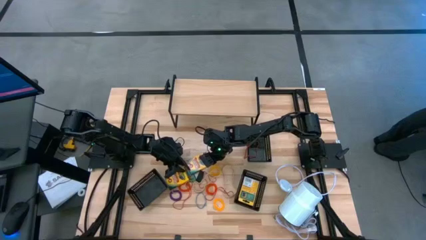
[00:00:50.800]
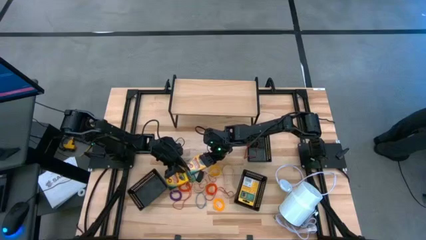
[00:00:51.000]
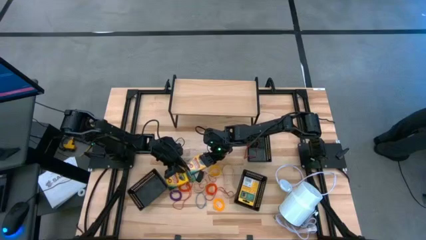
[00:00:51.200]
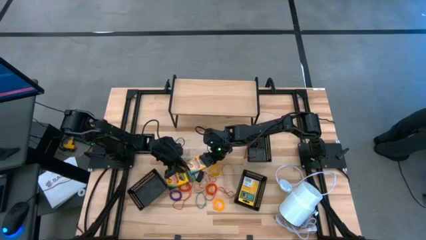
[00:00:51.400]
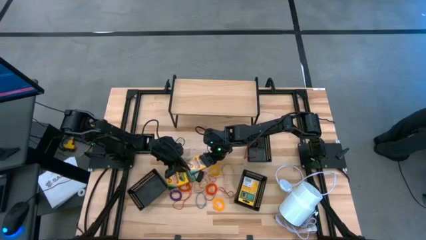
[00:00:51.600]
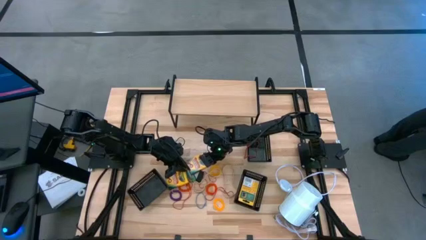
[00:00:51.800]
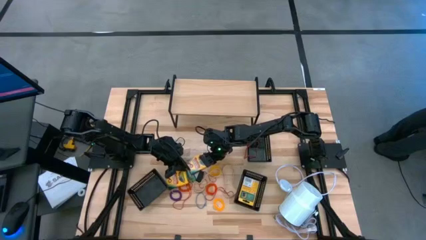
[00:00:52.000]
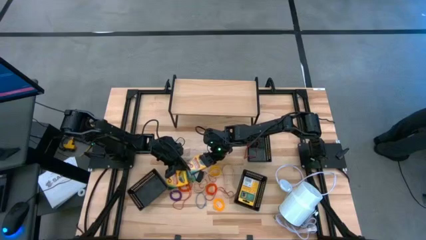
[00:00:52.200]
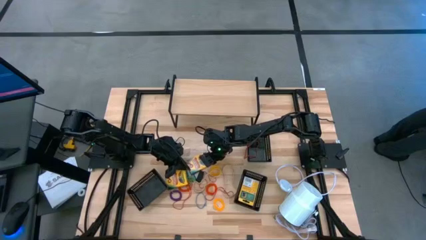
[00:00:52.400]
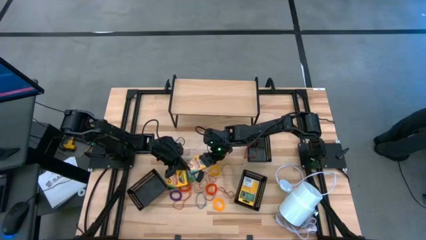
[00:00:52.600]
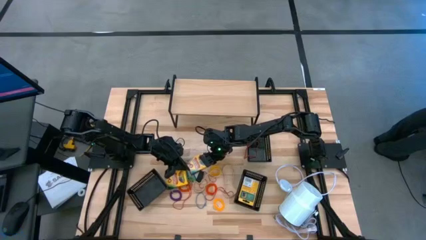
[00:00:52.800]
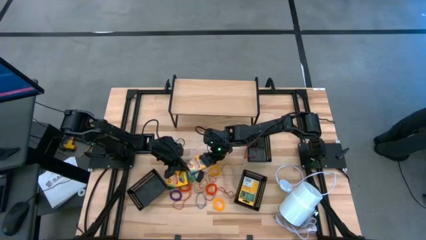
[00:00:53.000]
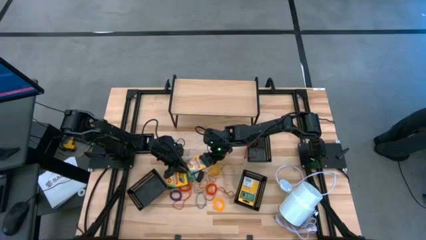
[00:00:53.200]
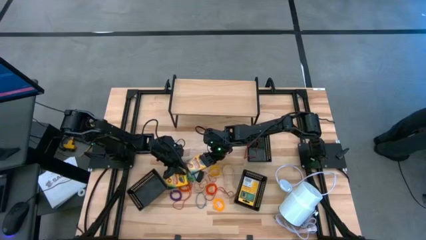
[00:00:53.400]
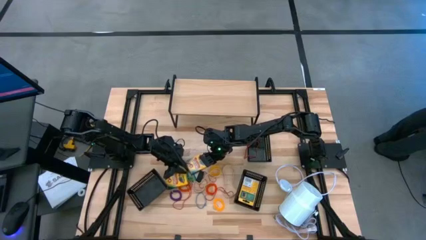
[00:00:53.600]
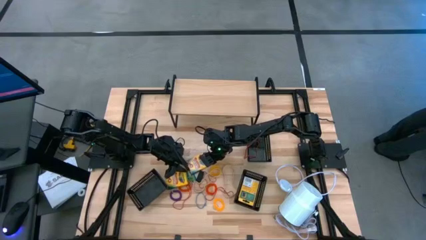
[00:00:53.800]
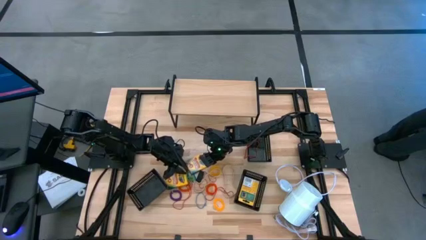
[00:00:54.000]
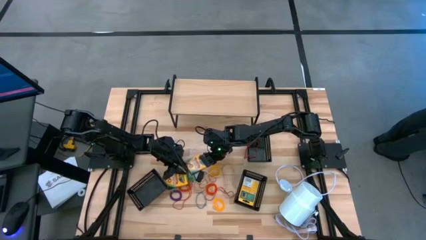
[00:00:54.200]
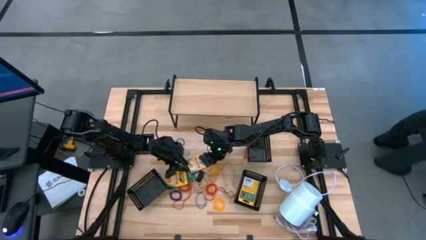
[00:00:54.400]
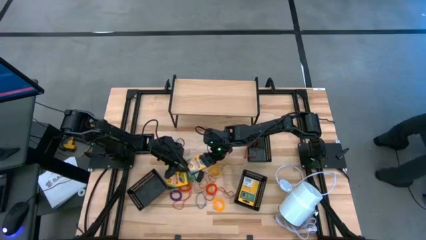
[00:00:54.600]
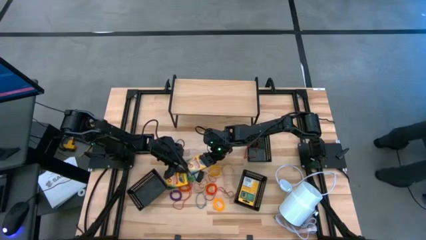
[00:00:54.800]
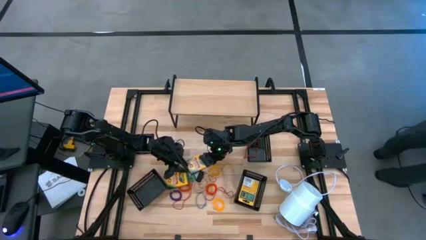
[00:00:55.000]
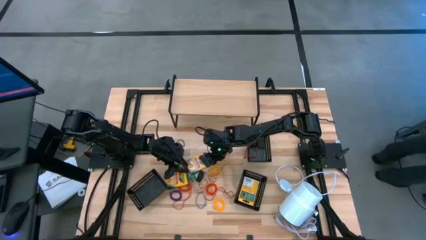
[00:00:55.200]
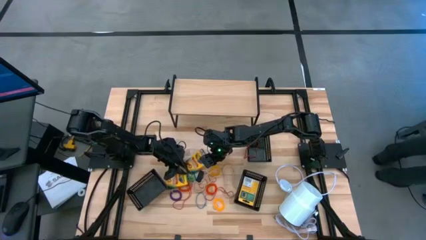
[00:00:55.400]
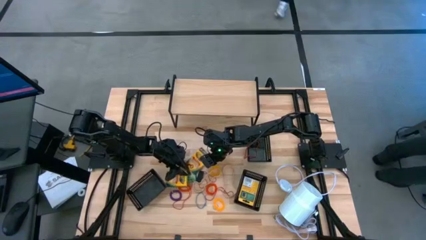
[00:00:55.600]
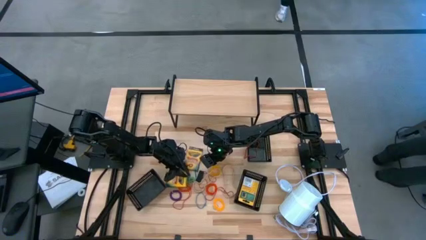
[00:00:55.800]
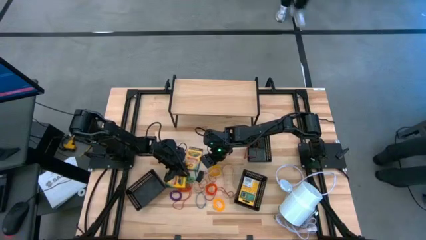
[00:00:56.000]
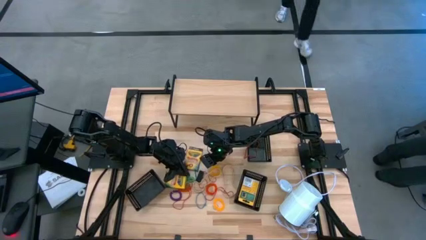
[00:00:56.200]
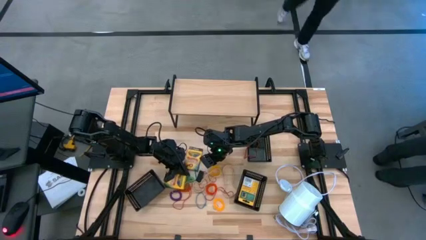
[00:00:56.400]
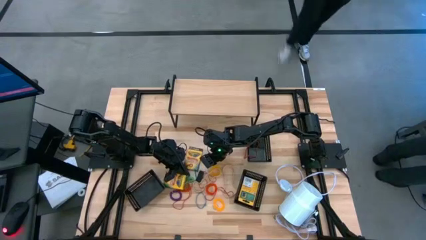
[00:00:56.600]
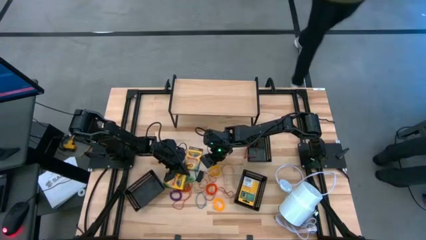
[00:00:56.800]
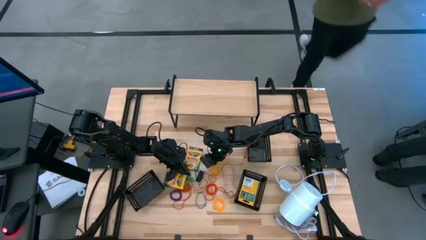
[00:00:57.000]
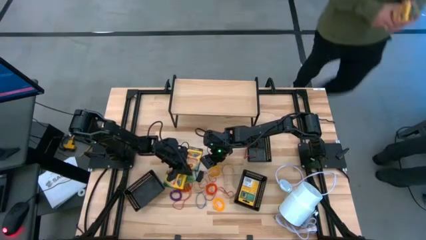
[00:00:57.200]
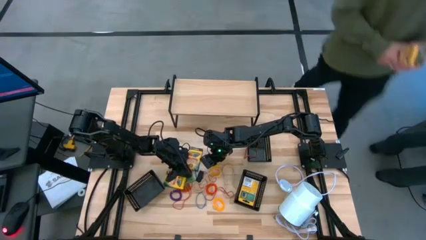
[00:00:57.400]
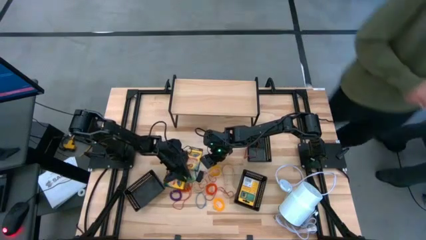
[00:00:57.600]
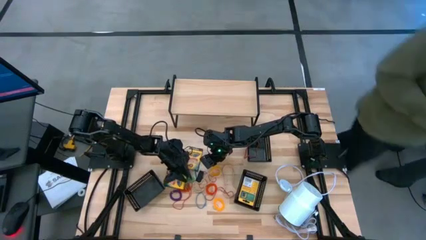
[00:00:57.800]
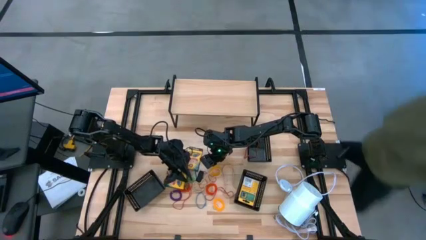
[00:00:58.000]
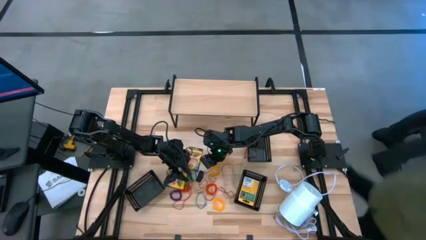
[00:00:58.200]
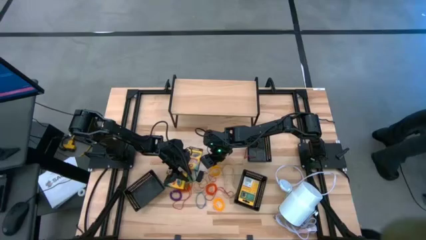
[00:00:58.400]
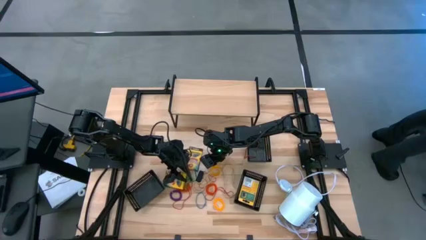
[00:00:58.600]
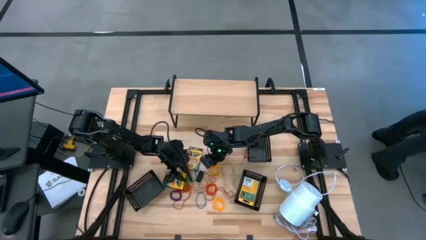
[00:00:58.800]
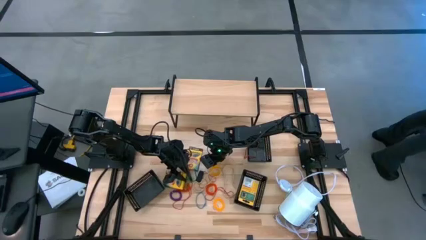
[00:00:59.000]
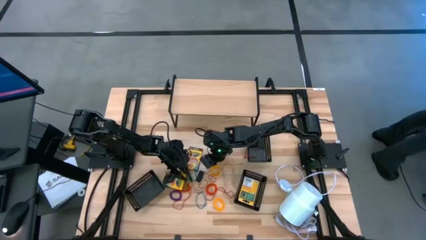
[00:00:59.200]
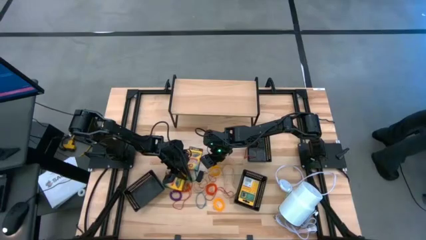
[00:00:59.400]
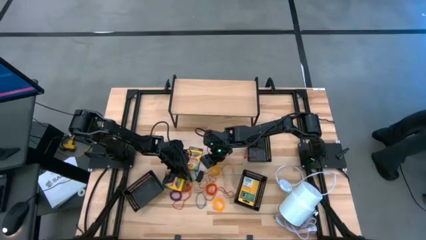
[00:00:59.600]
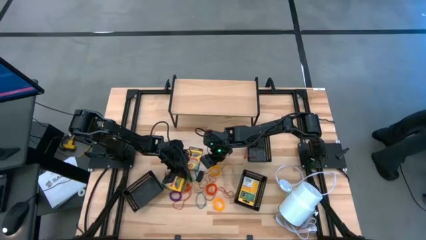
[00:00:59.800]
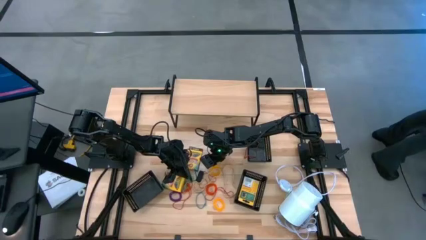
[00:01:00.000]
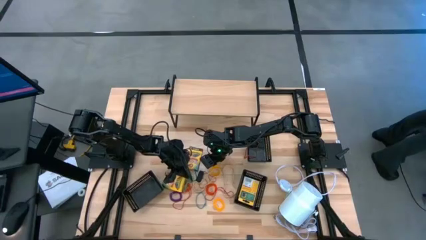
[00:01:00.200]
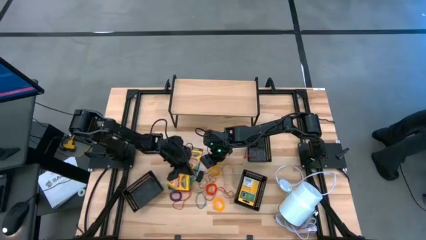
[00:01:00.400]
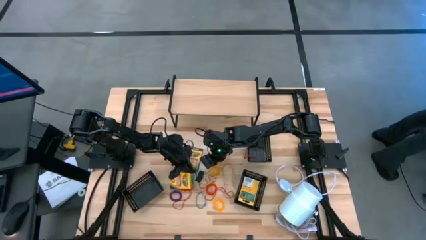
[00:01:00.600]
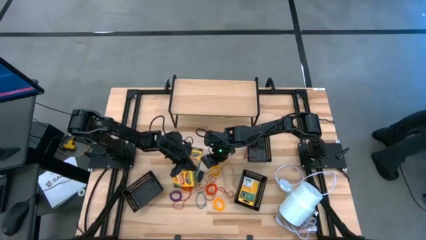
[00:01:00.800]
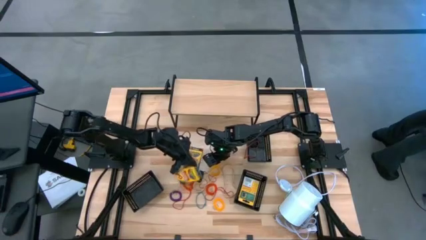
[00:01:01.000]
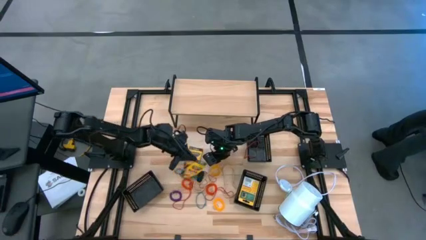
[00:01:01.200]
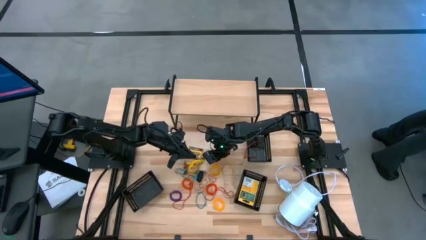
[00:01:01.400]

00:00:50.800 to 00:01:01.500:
Task: Pick & Place Office Desk Supplies
Put the left crayon box into the bottom right black bin

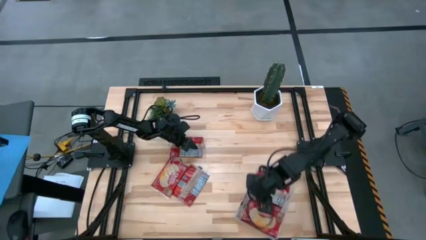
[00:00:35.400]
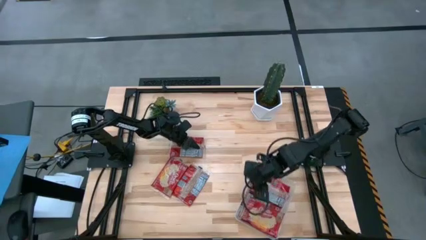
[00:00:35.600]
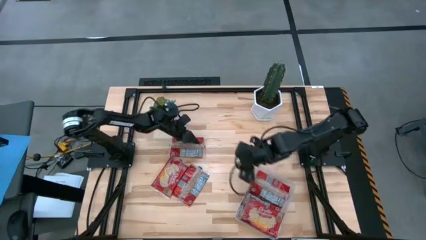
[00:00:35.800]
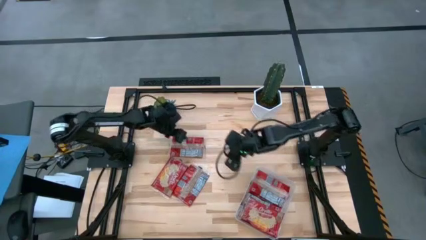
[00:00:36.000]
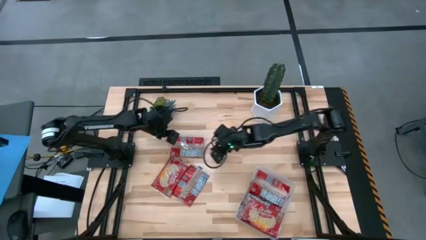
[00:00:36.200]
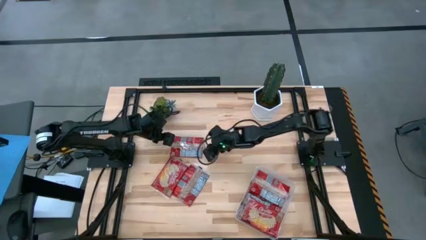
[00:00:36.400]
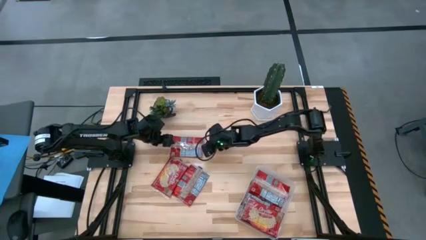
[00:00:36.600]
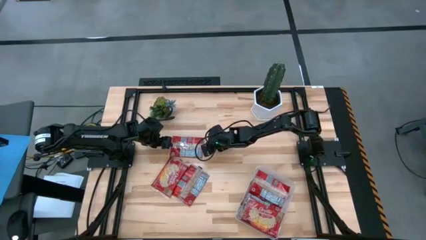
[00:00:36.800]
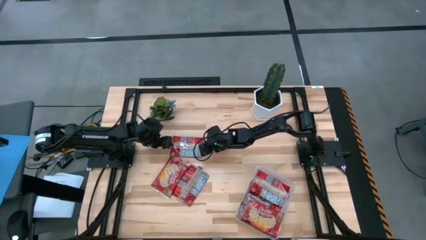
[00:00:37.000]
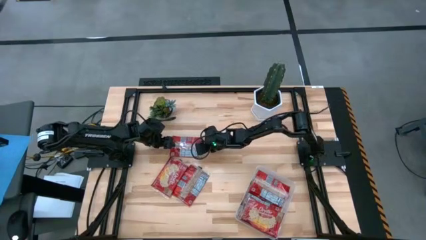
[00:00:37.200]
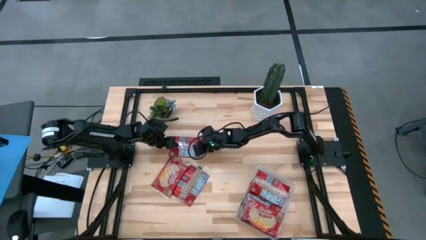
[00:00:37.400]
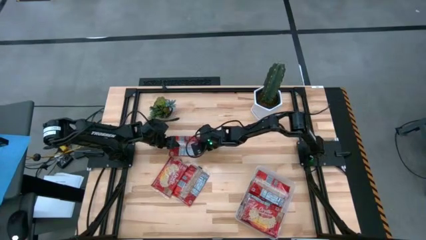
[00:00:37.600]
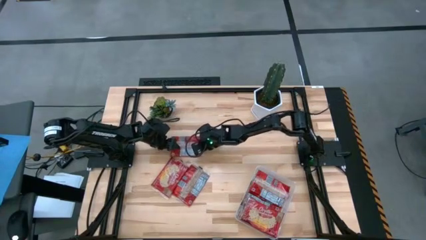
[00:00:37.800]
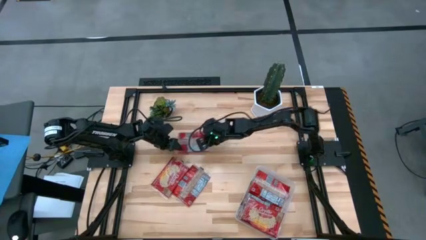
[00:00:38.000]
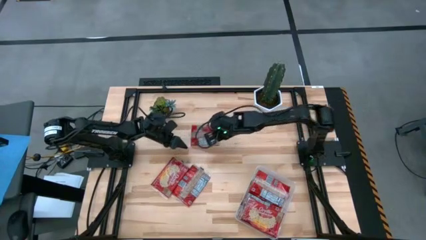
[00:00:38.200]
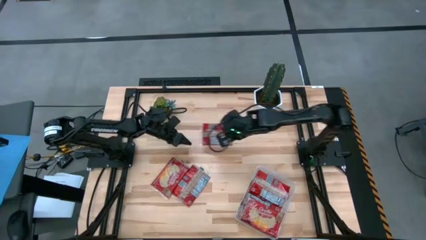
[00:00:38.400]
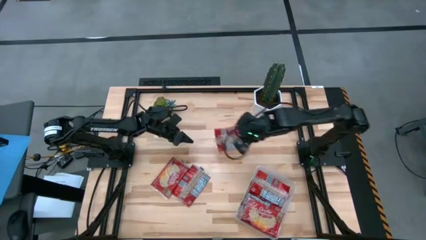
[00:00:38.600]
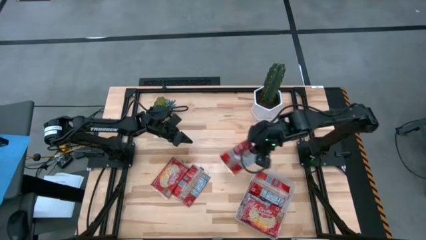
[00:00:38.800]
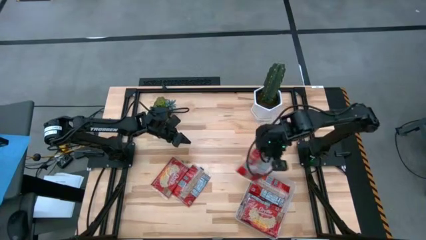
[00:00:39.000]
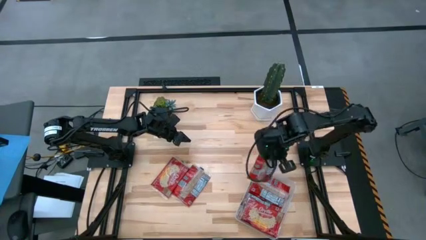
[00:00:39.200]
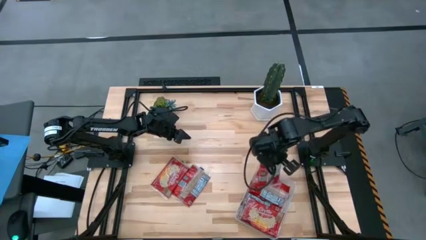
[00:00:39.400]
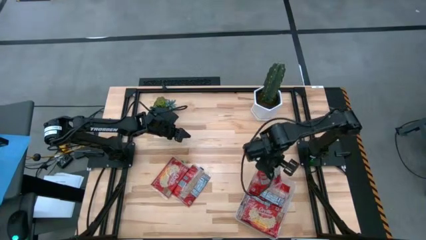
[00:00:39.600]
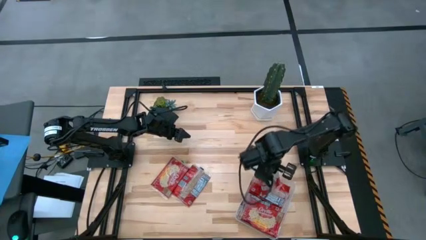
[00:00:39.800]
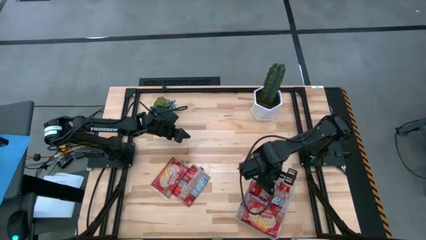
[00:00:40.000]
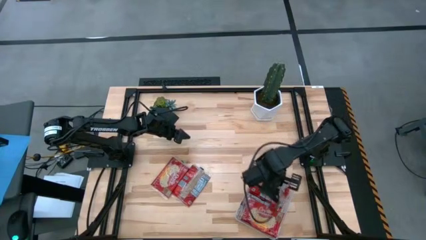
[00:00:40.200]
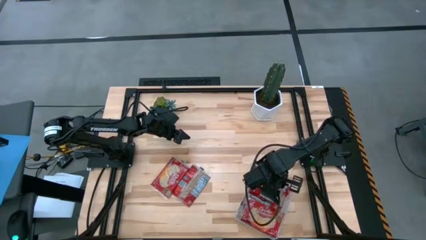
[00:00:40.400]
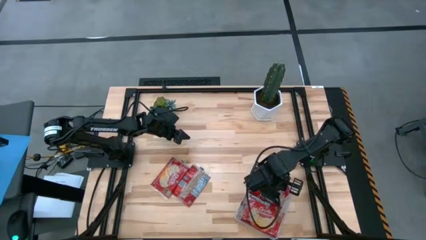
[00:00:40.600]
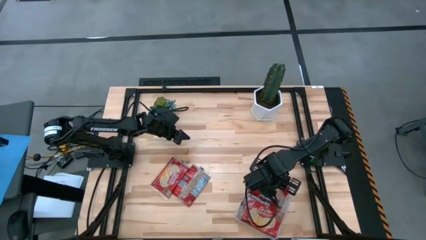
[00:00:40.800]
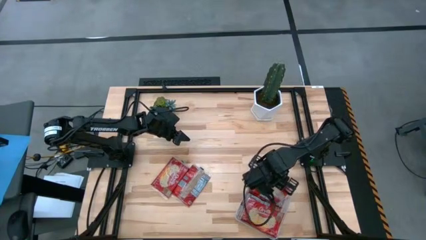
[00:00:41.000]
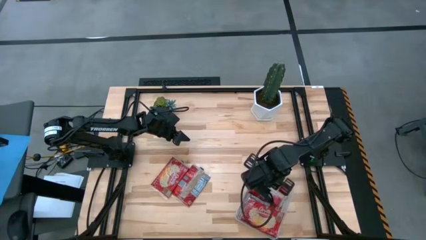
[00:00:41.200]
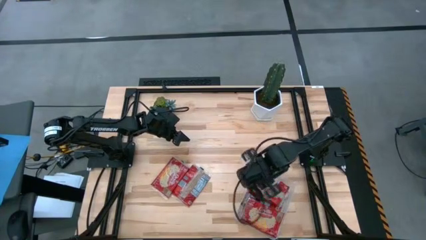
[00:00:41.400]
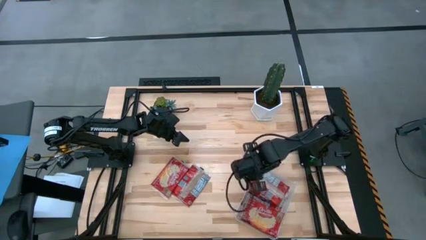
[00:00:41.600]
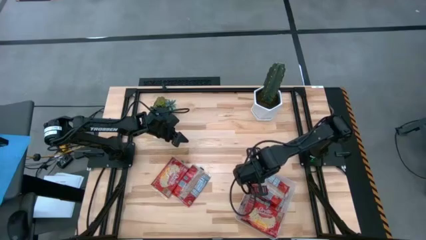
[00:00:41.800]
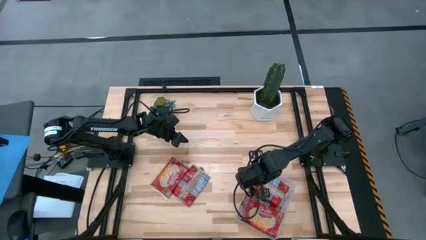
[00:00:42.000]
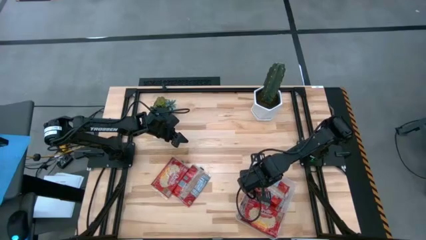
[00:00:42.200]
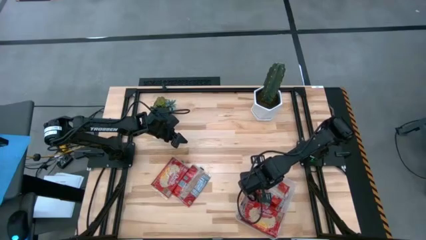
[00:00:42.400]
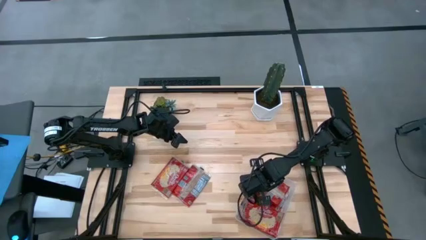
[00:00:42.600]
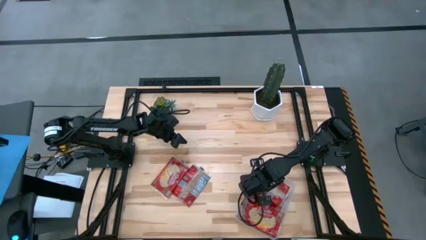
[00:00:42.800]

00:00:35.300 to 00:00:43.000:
Task: Sort popcorn bags into baskets
Put the red popcorn bag into the transparent bin
